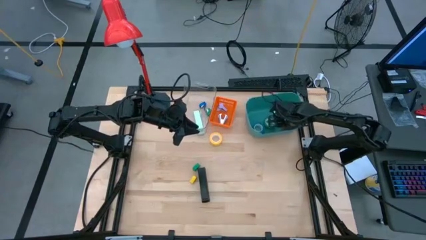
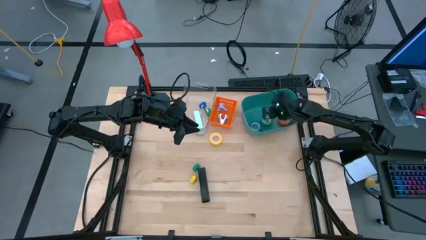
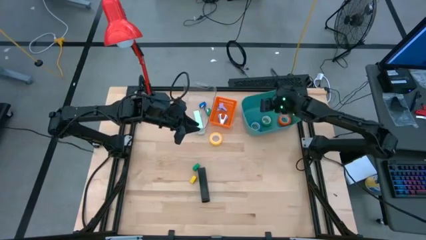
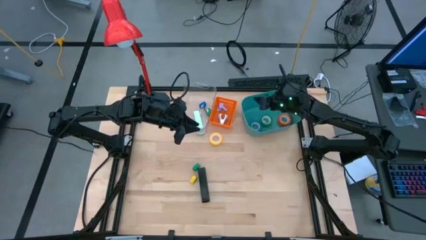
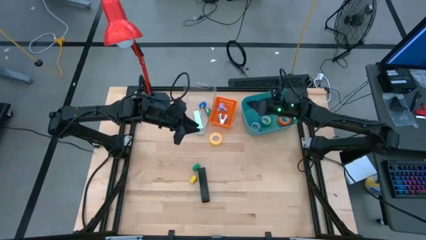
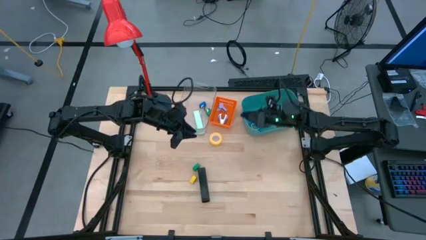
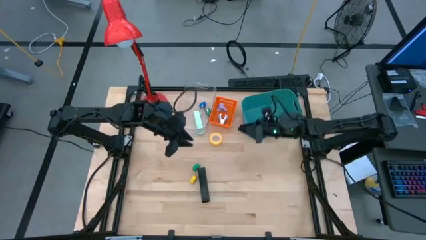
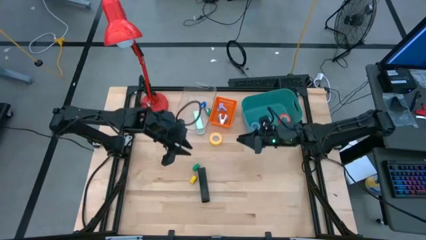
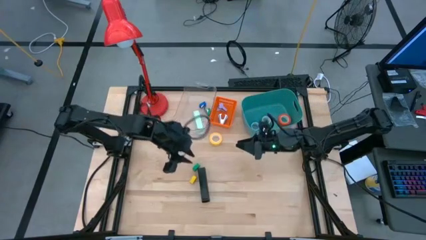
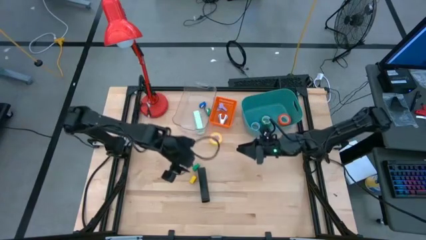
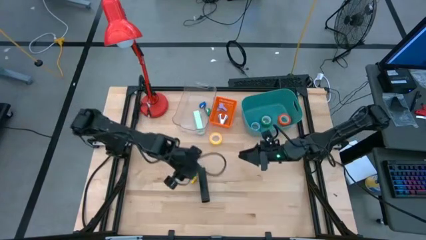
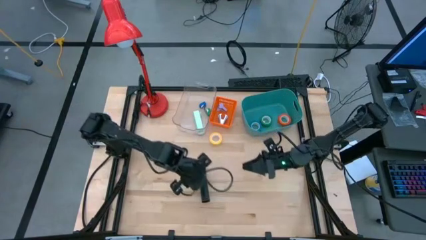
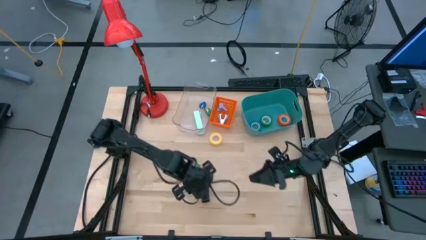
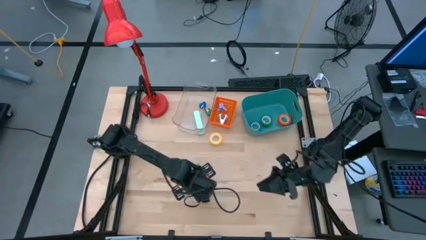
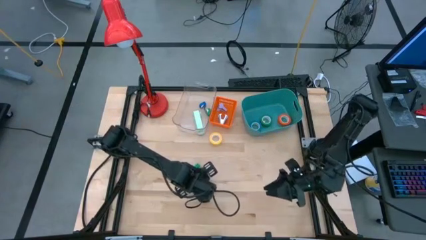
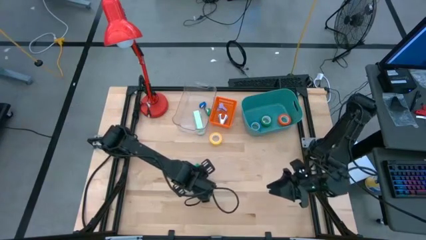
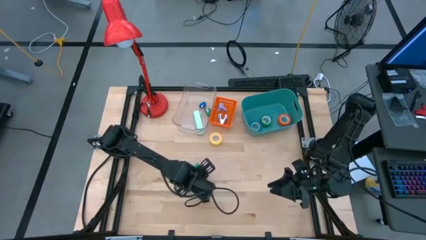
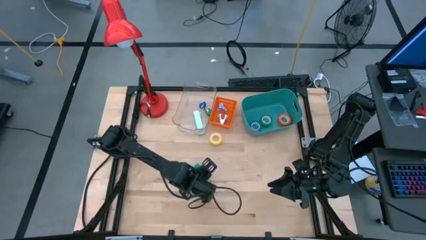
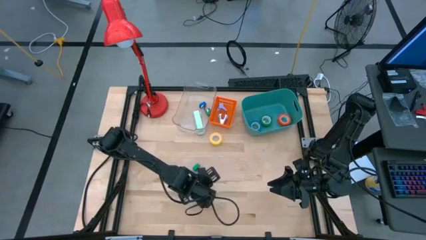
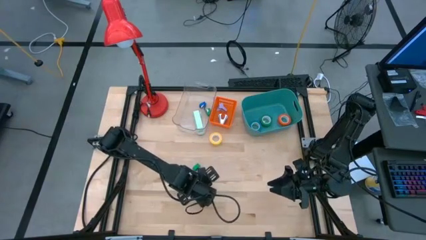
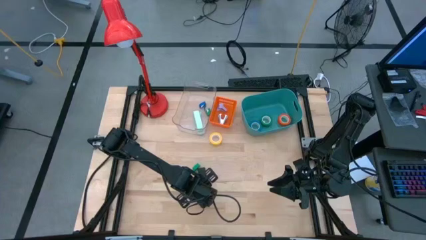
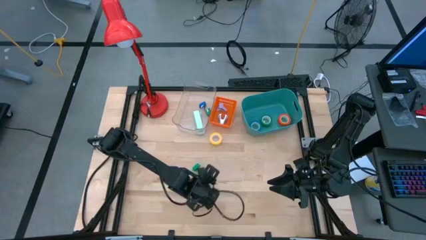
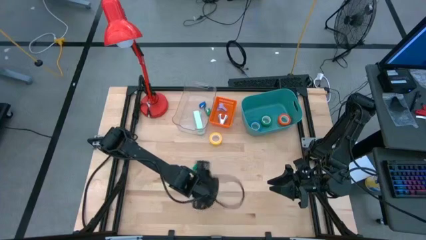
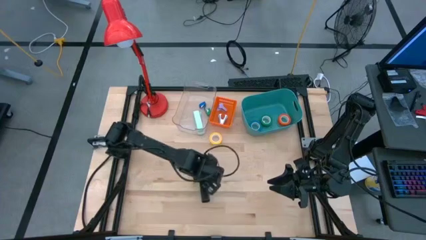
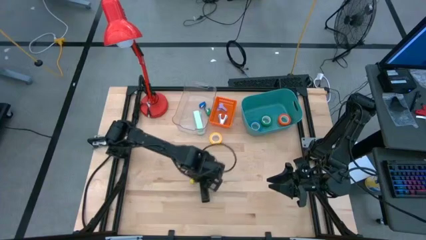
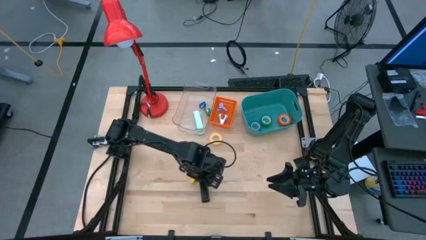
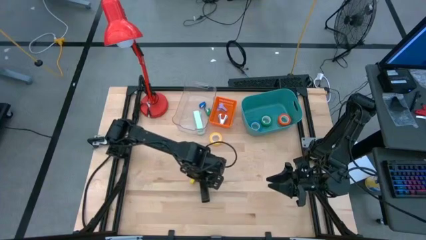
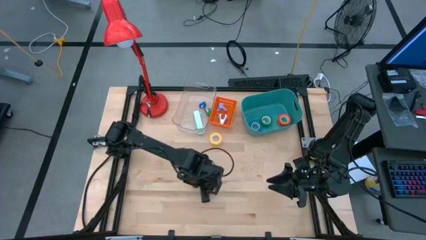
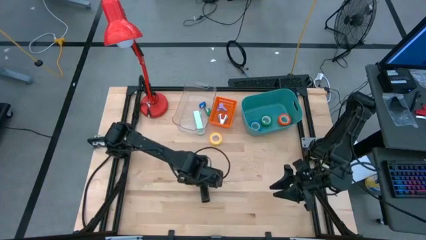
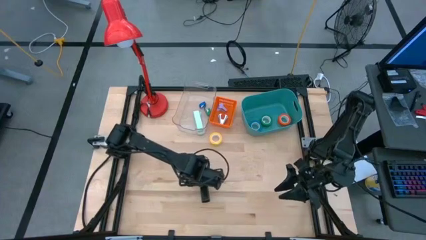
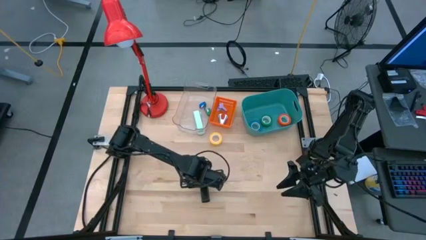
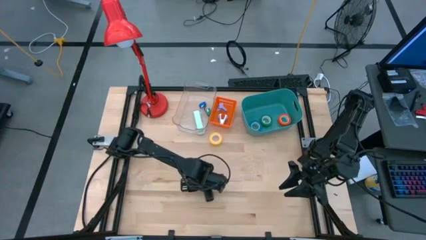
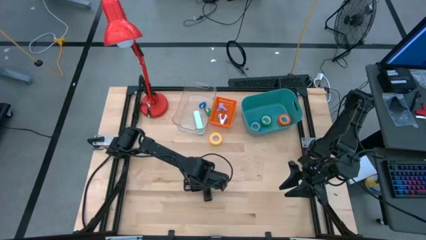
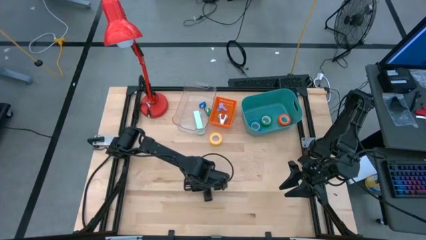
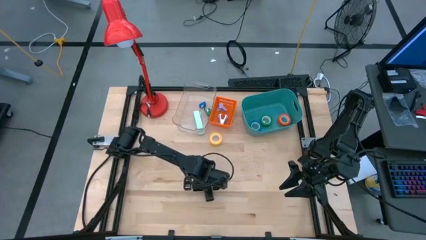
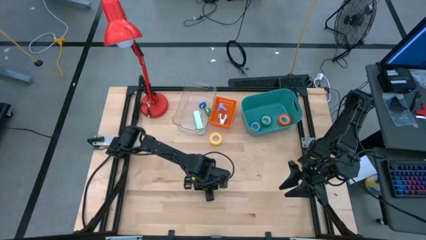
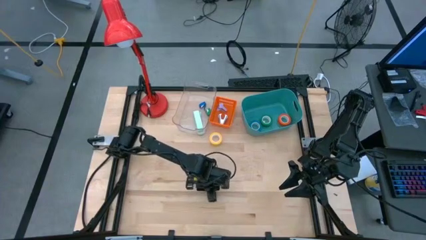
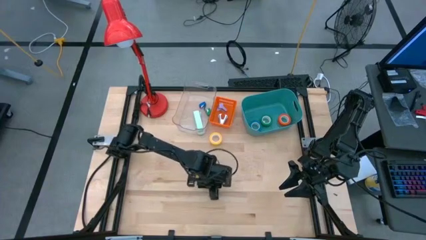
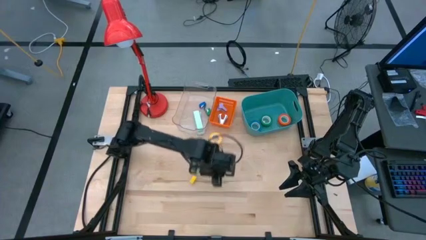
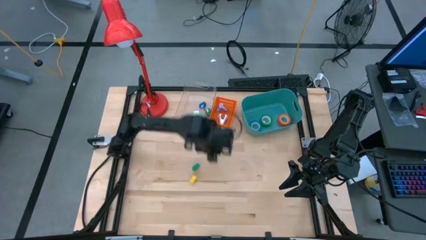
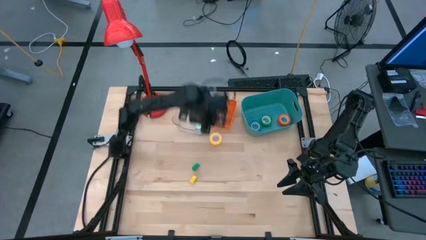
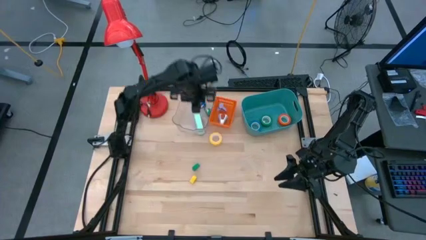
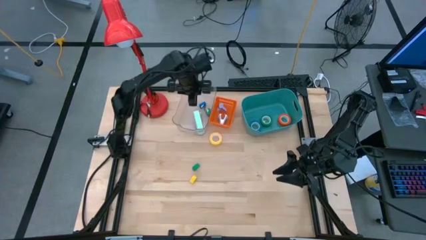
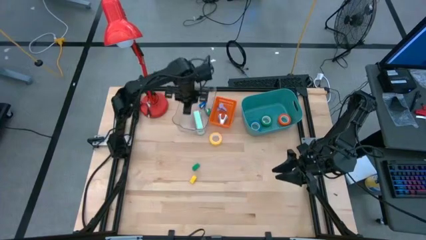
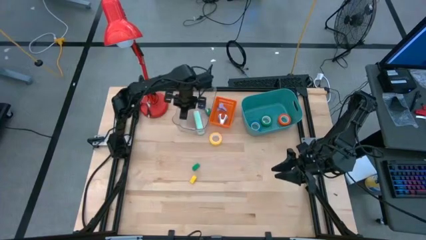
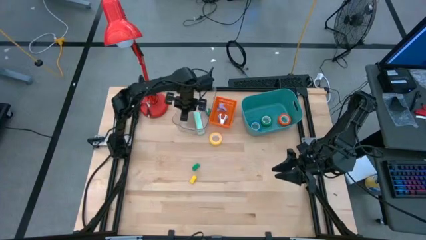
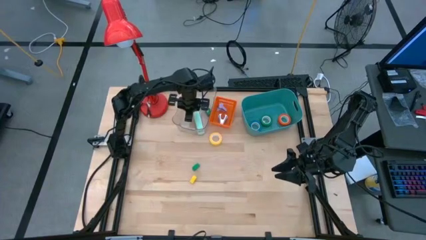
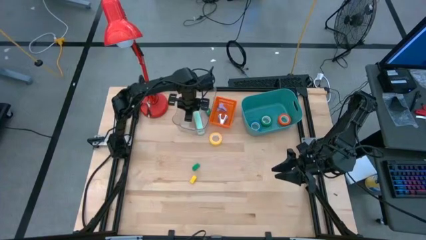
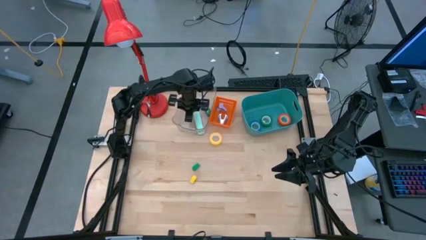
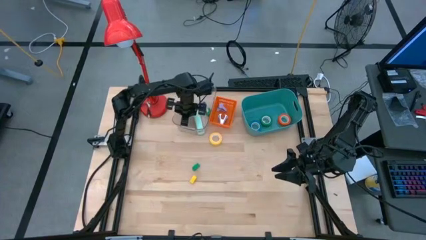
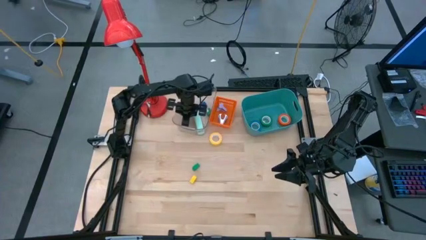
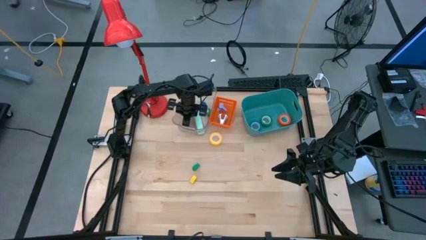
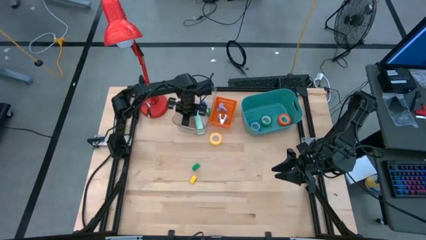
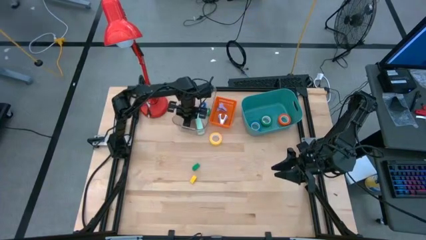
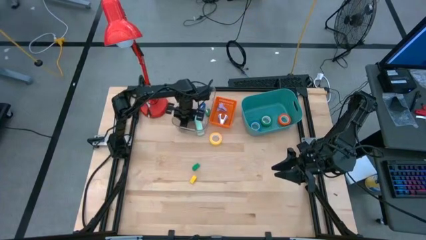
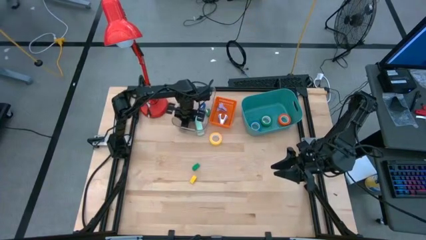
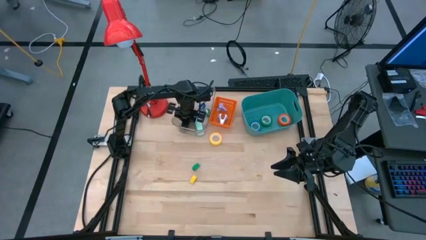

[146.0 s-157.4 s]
Task: Pick and place Stapler, Stapler remover, tape
Put the black stapler into the transparent bin
